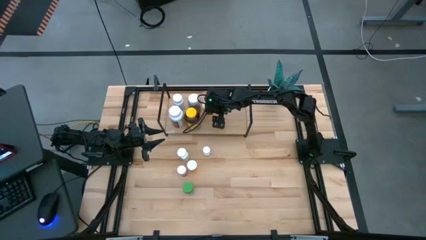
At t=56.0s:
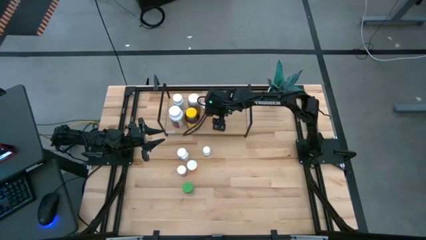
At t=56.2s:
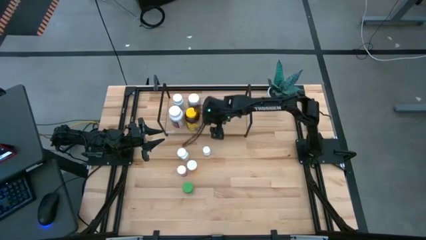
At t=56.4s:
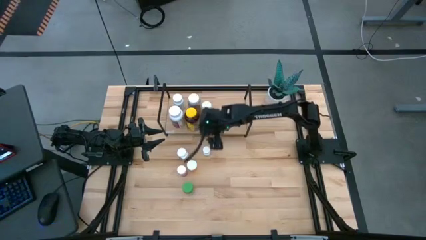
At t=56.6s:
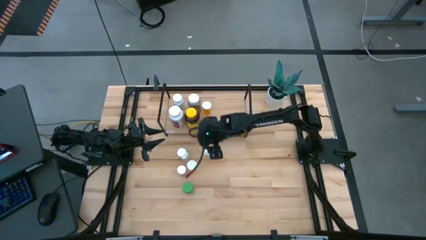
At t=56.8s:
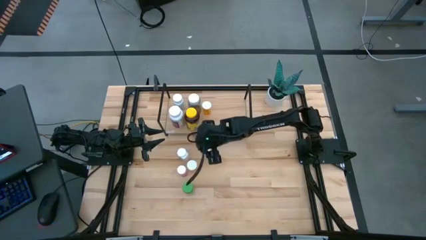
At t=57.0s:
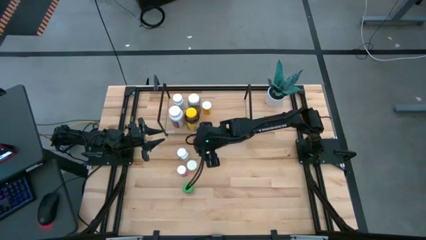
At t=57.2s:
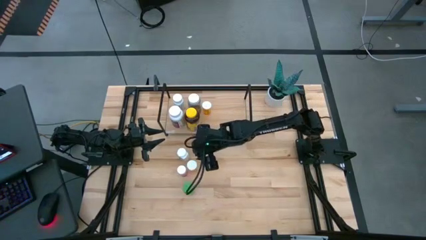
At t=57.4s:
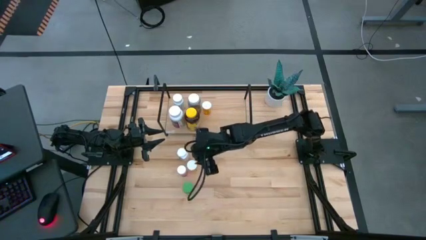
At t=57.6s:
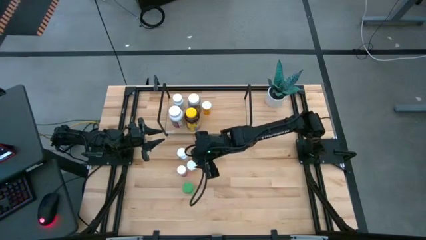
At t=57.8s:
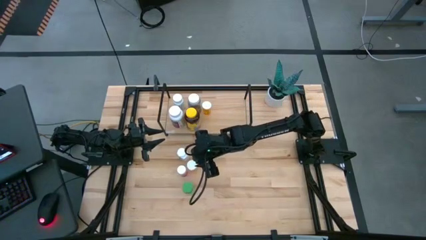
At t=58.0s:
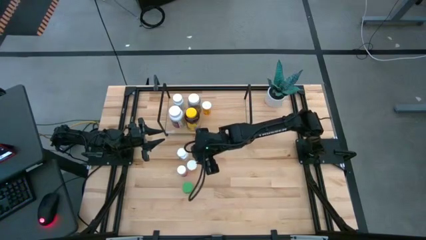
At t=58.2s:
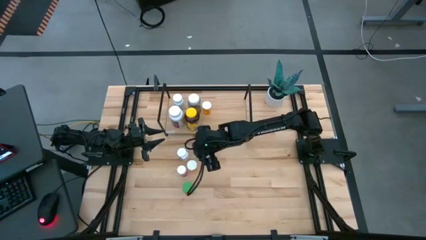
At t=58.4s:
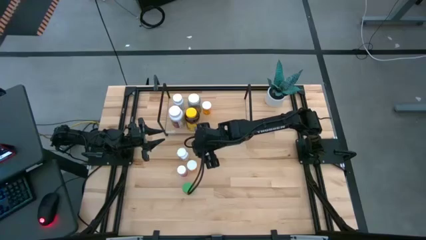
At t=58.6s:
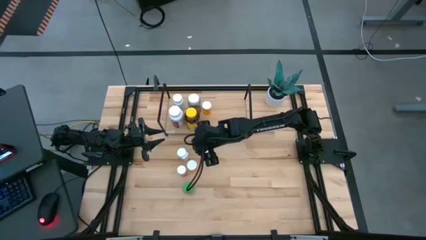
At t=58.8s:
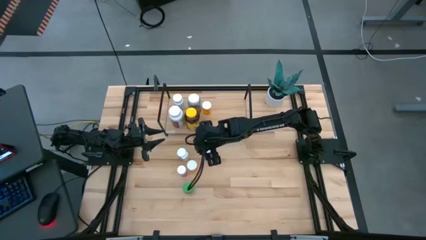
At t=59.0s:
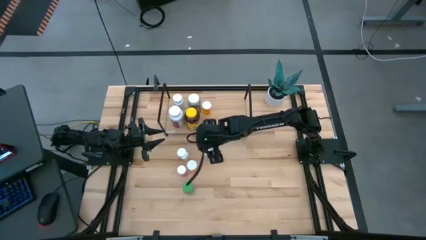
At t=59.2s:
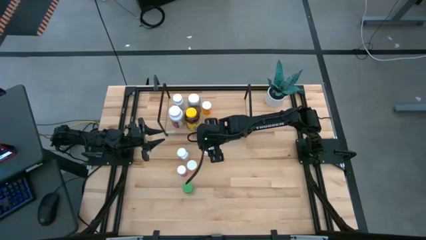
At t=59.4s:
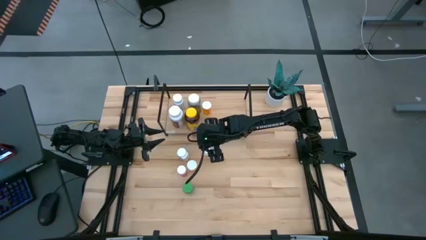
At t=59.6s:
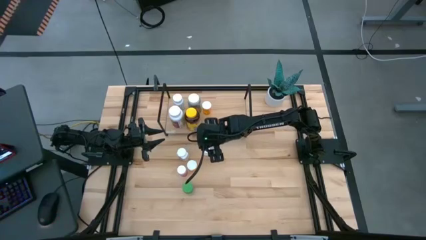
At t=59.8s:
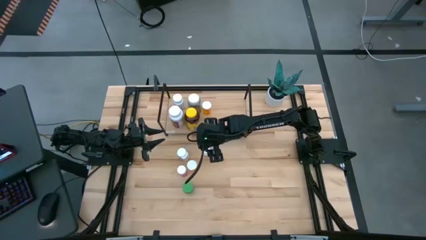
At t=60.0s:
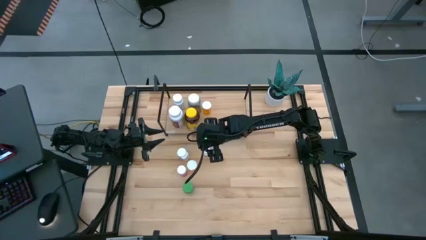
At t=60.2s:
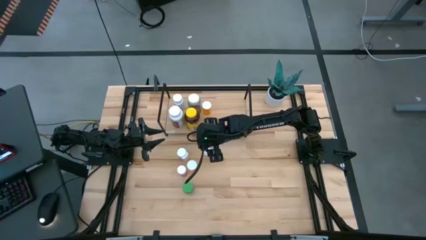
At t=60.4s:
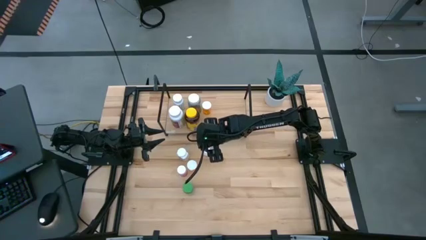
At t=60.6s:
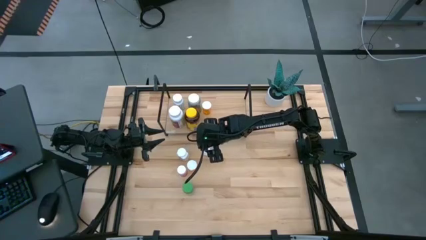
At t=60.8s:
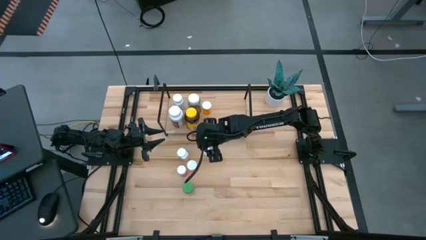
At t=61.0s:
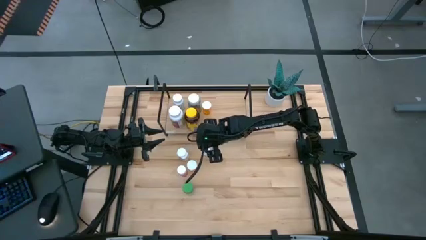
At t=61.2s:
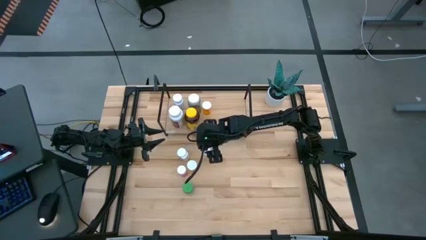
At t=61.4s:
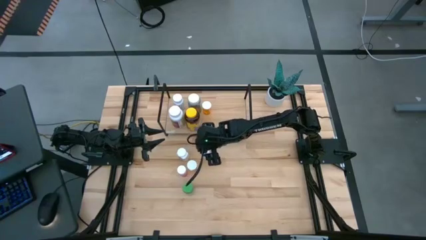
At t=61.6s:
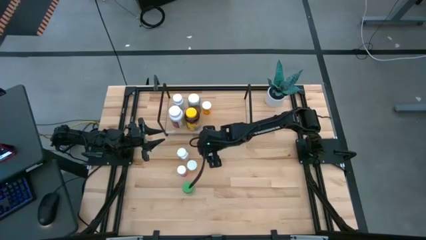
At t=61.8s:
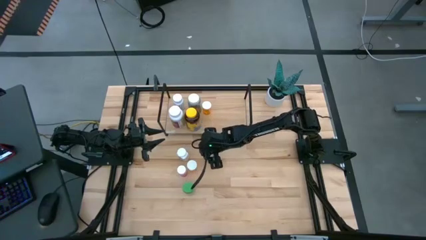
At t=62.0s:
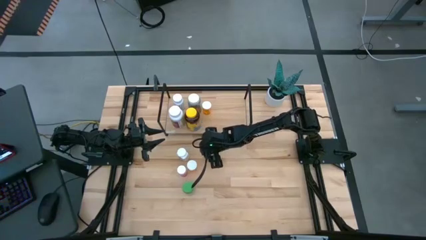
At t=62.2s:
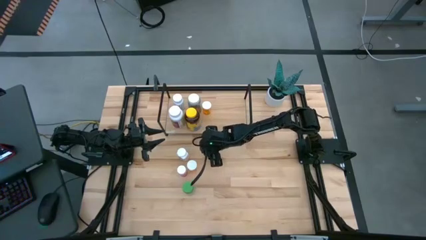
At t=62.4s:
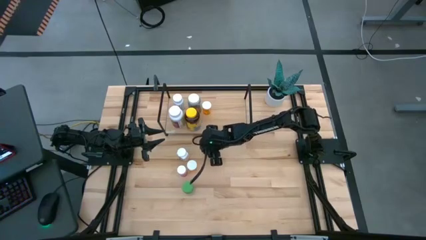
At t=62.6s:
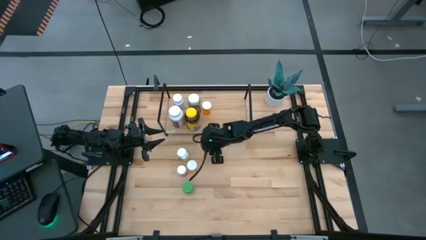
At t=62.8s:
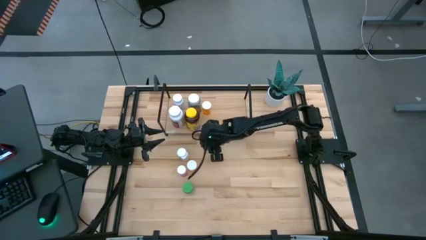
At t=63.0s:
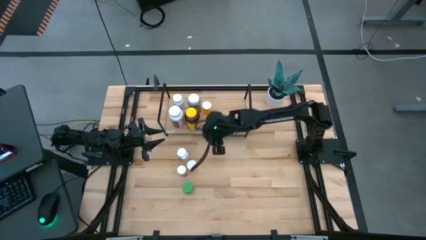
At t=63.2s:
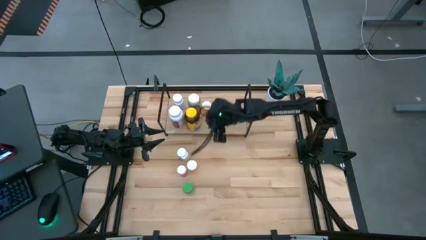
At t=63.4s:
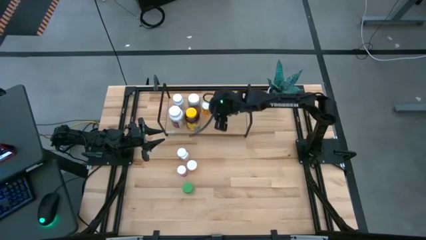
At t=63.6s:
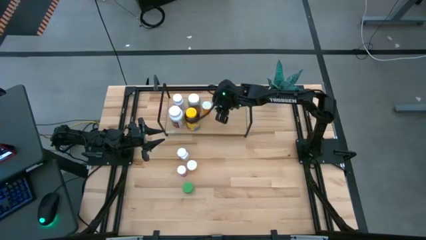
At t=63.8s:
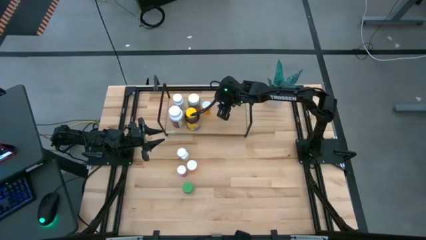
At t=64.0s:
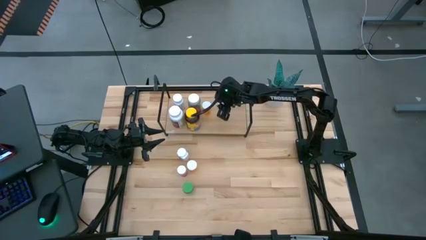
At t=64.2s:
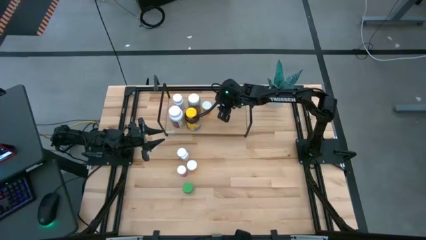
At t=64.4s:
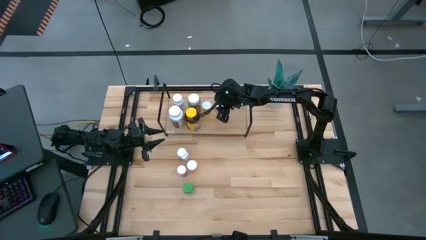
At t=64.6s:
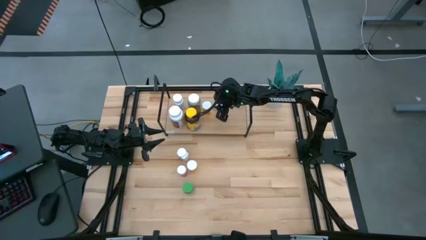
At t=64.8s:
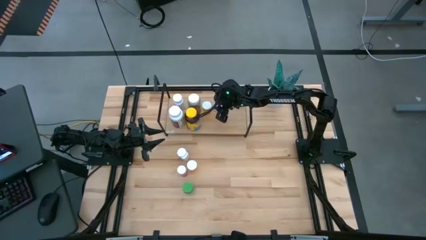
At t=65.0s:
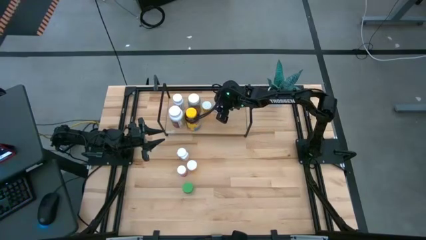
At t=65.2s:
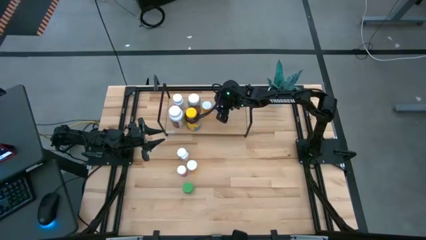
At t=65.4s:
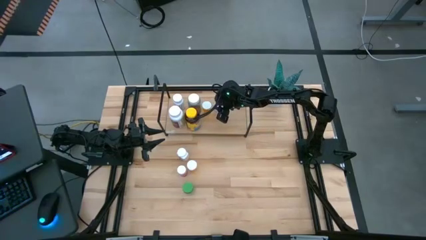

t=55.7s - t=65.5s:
Task: Pick and place medicine bottles onto shelf by color
Put the white small bottle on the shelf

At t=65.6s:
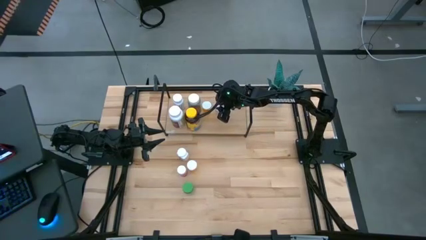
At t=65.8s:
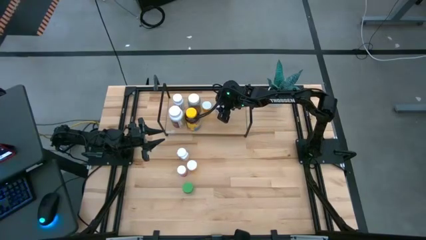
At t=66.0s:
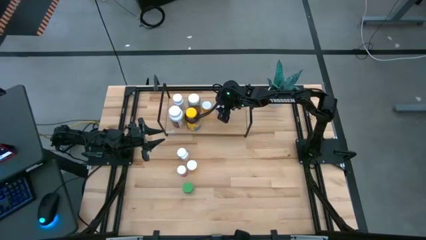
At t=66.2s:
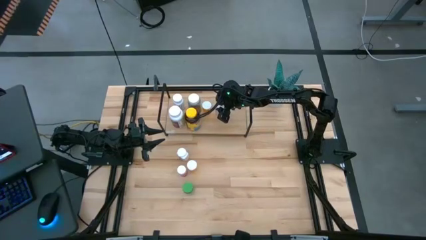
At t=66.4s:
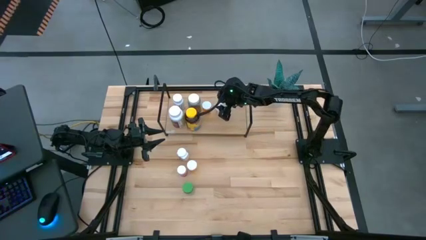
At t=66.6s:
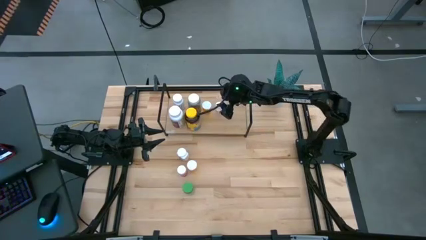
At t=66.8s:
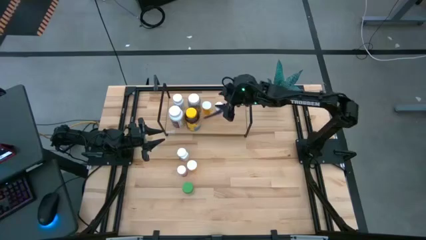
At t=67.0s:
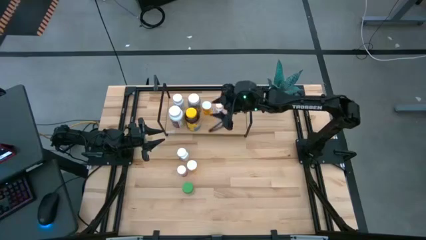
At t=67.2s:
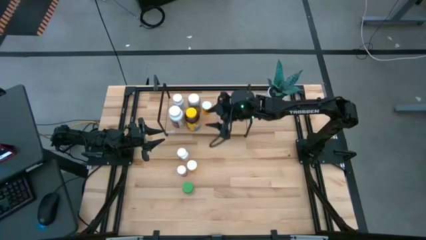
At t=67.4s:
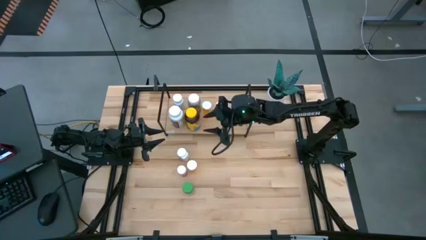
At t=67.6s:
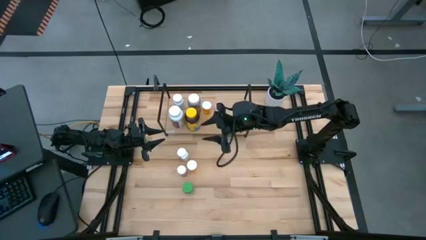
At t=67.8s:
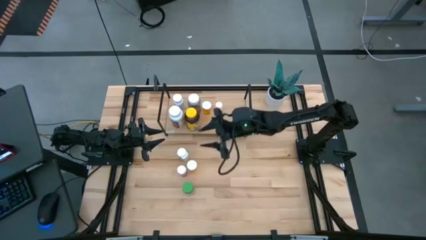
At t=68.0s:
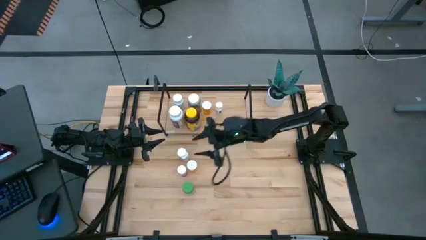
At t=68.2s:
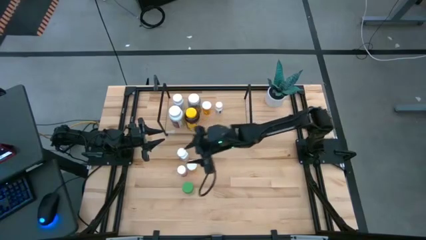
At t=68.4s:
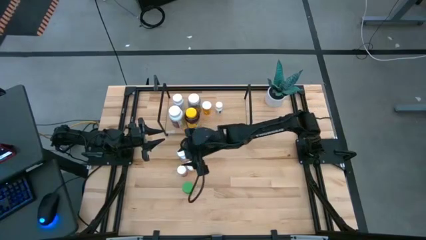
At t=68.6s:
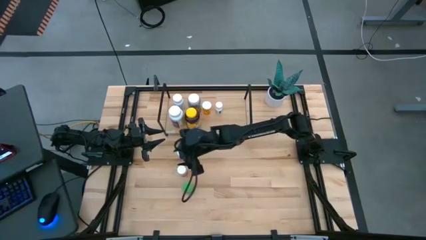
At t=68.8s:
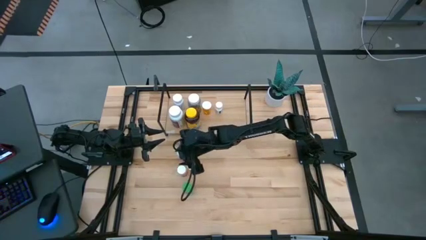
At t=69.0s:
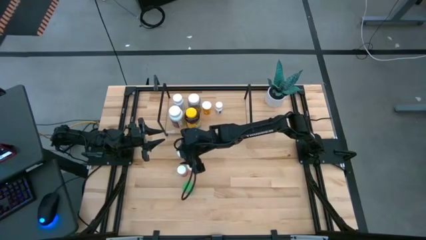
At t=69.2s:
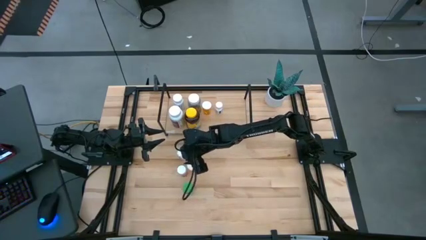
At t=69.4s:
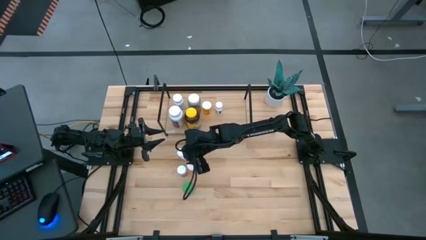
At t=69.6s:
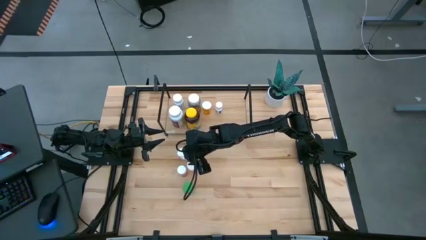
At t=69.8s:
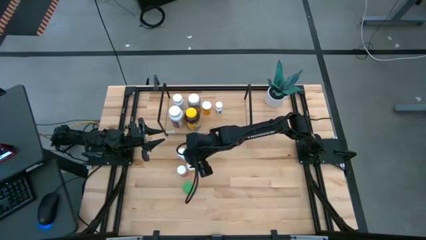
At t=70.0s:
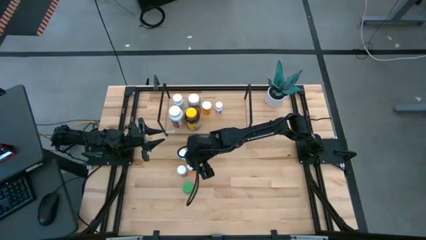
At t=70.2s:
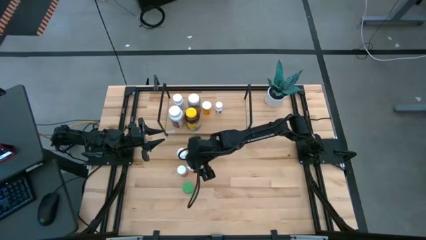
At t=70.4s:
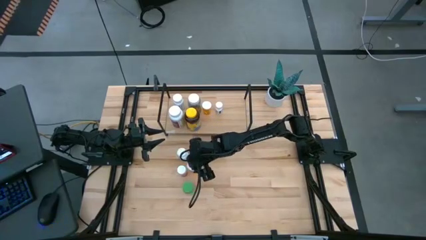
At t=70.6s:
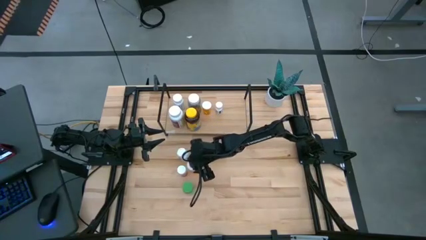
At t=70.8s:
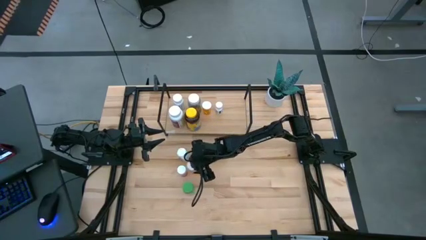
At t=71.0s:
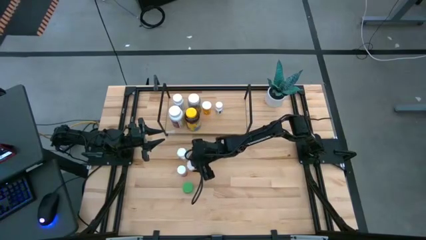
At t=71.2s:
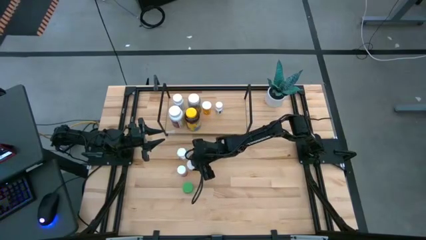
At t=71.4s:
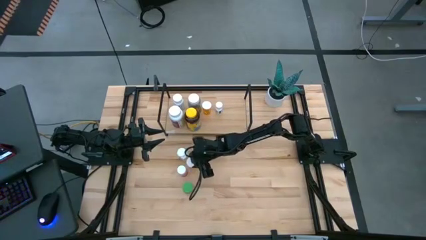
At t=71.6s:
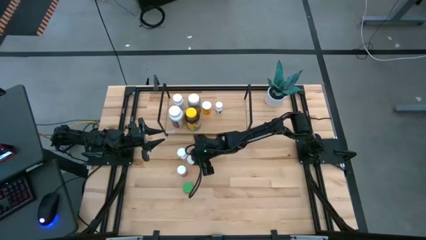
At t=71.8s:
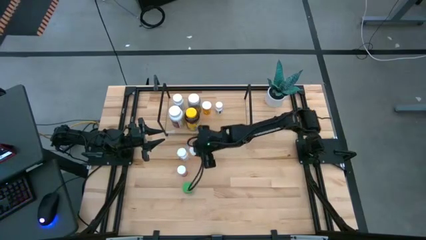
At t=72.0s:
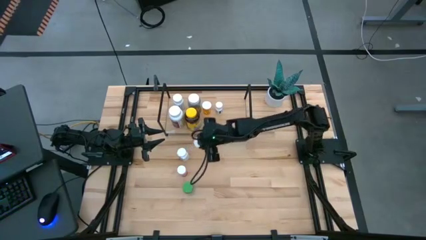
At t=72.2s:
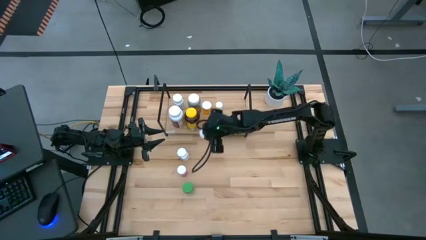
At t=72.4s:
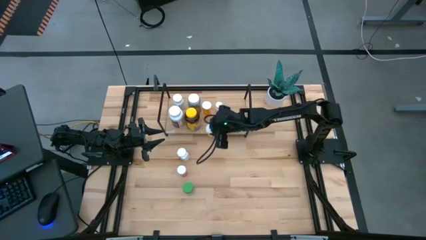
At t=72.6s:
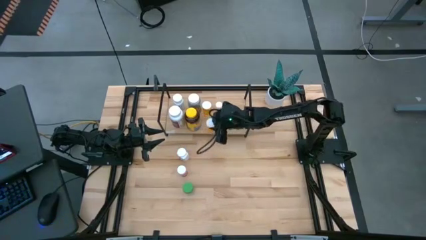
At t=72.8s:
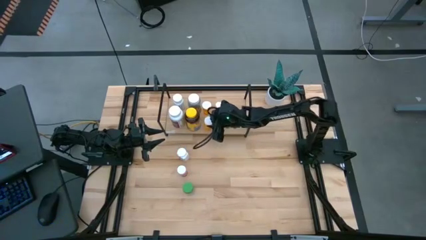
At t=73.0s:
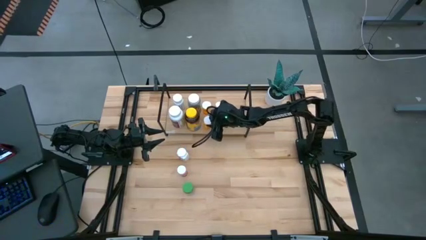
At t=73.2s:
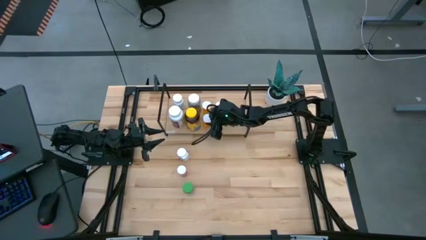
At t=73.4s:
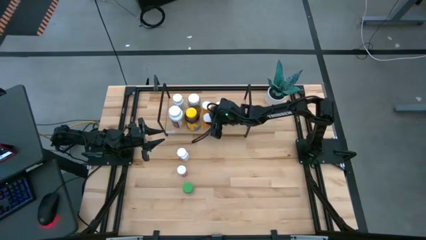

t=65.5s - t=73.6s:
Put the orange bottle on the shelf
